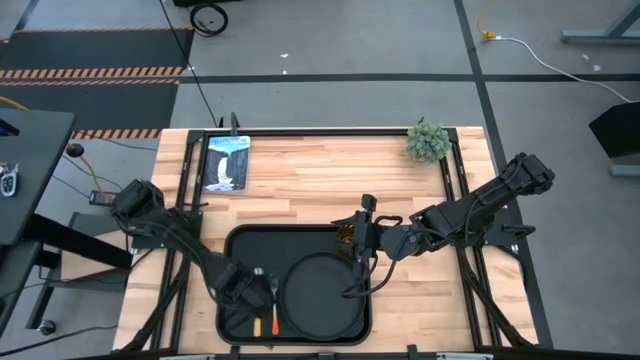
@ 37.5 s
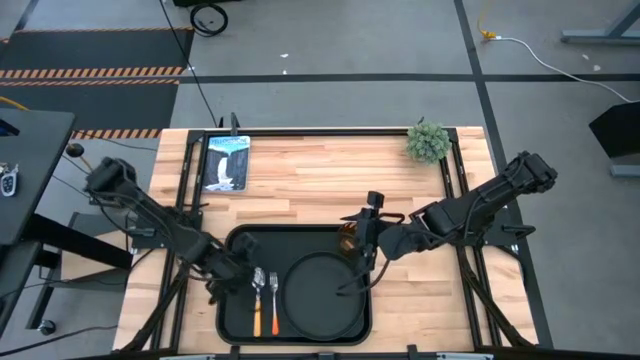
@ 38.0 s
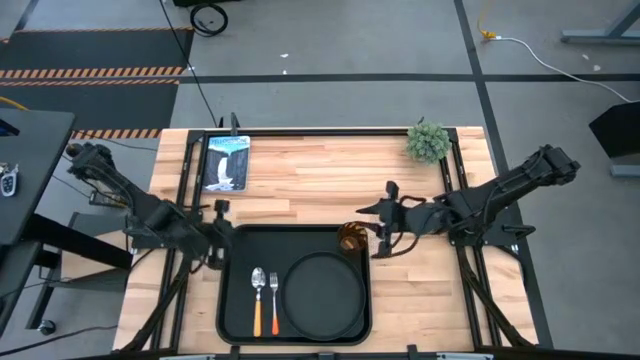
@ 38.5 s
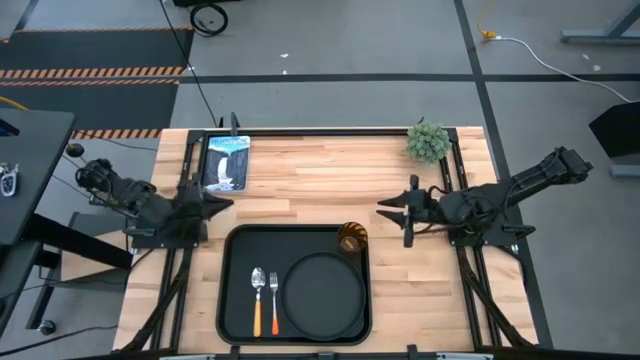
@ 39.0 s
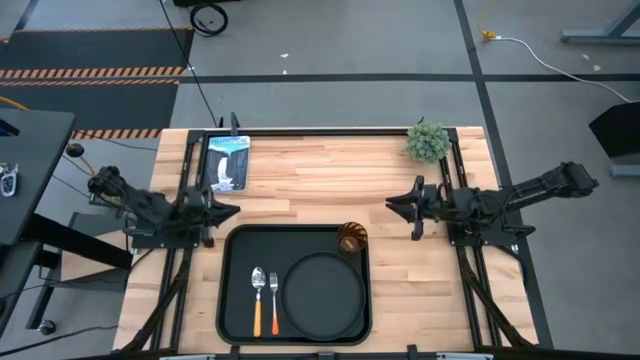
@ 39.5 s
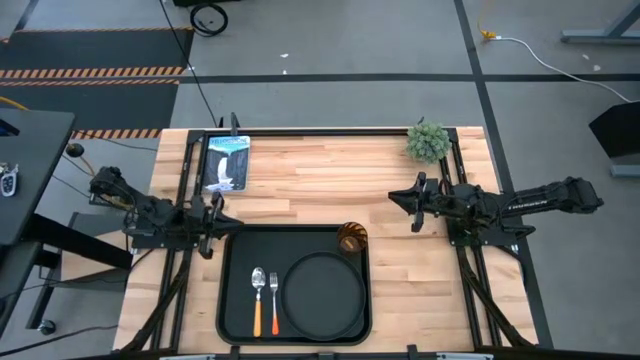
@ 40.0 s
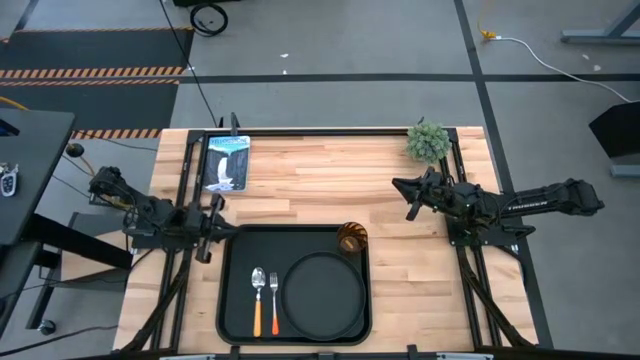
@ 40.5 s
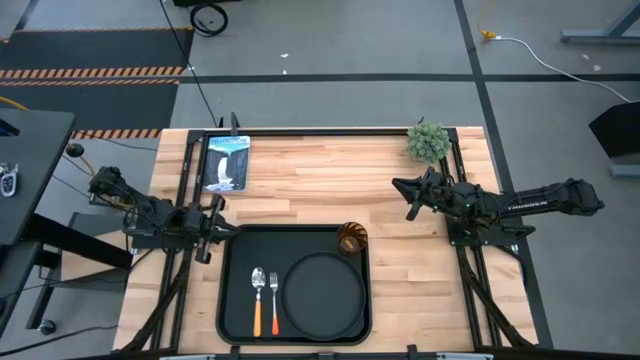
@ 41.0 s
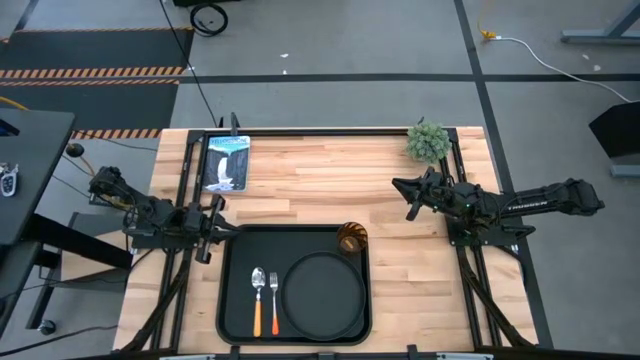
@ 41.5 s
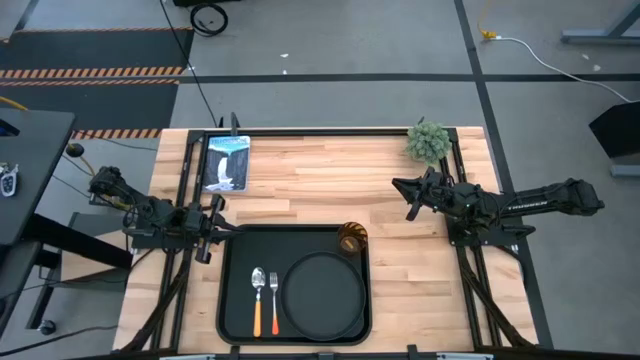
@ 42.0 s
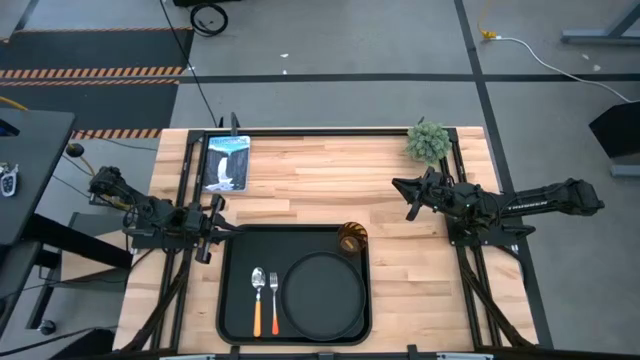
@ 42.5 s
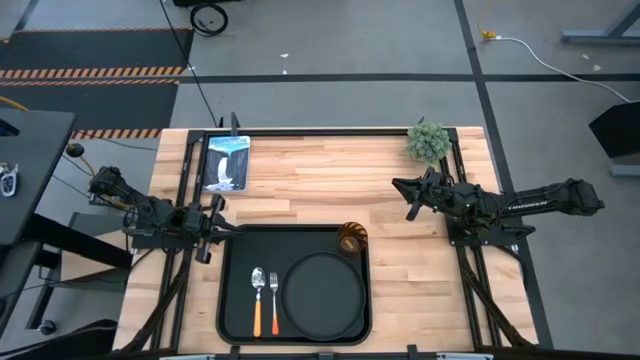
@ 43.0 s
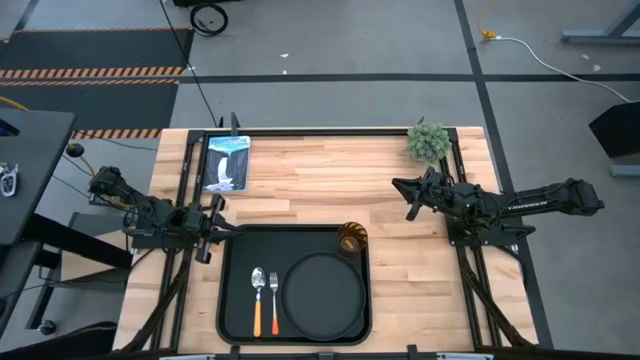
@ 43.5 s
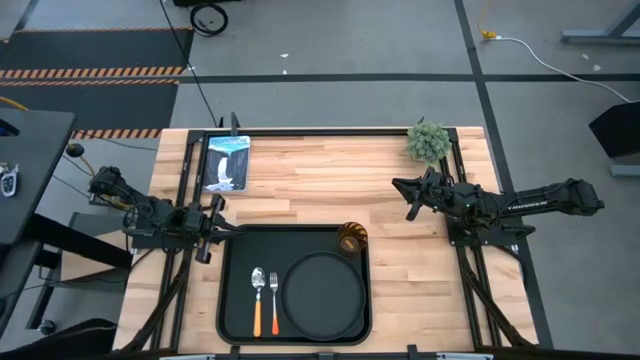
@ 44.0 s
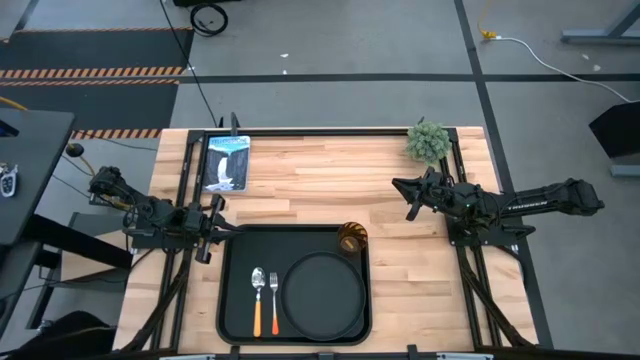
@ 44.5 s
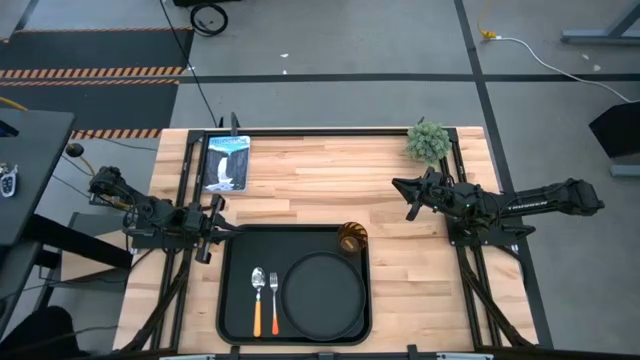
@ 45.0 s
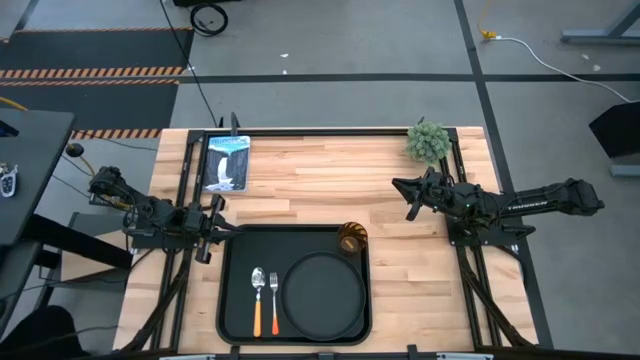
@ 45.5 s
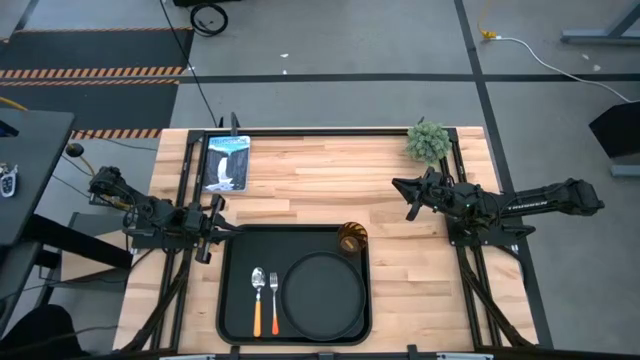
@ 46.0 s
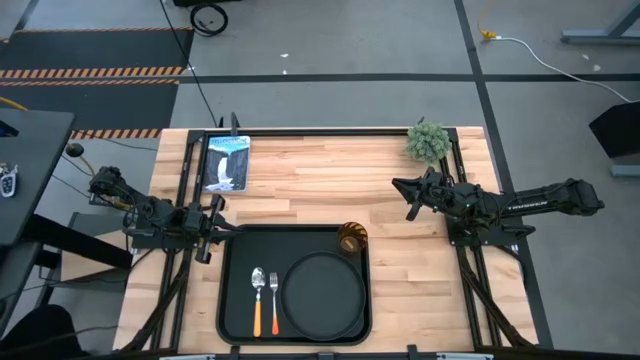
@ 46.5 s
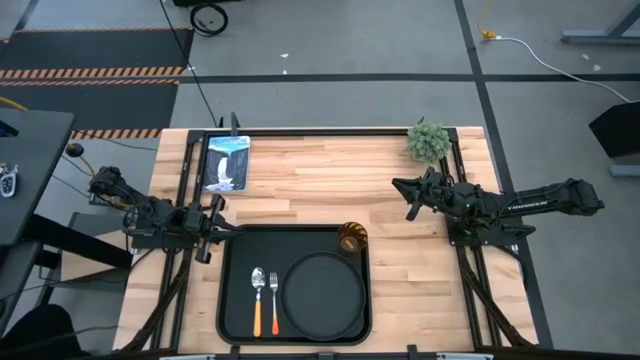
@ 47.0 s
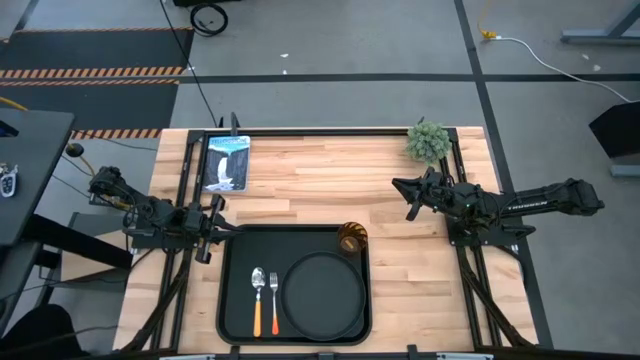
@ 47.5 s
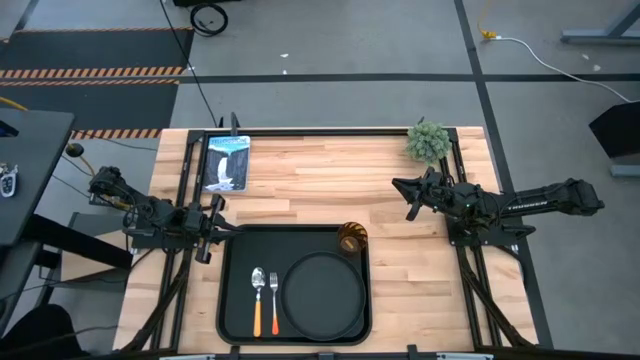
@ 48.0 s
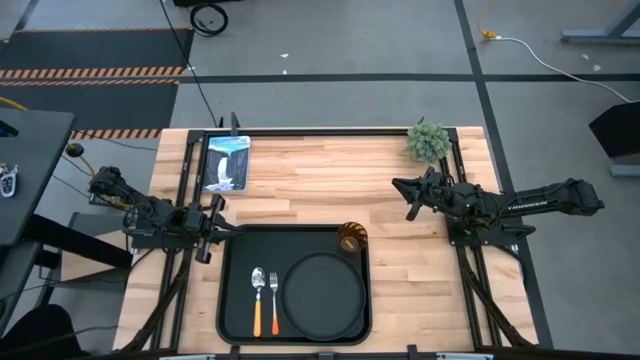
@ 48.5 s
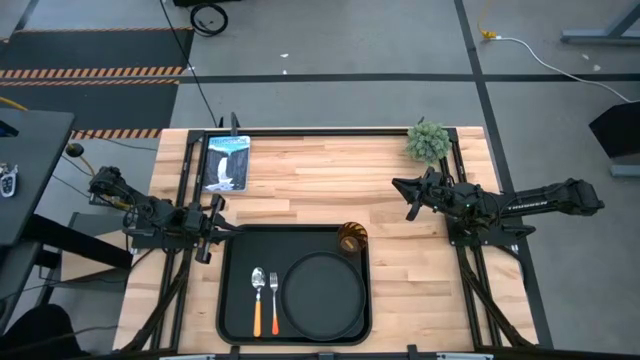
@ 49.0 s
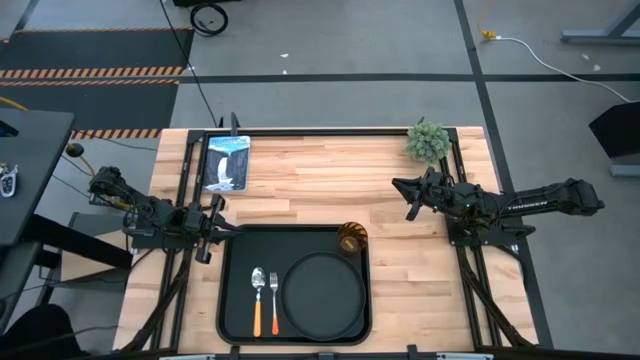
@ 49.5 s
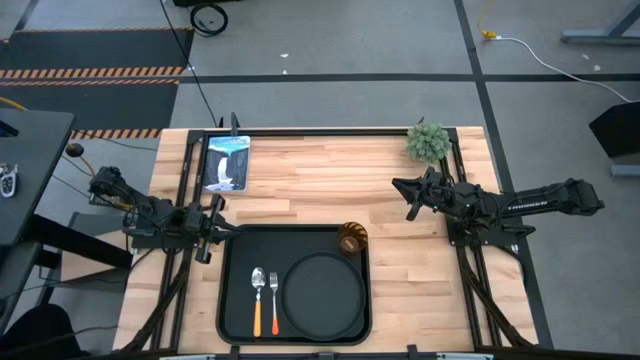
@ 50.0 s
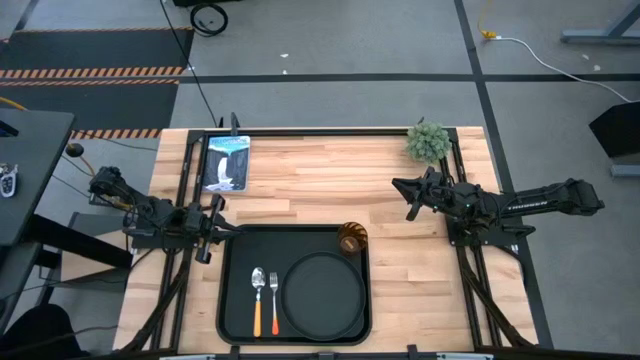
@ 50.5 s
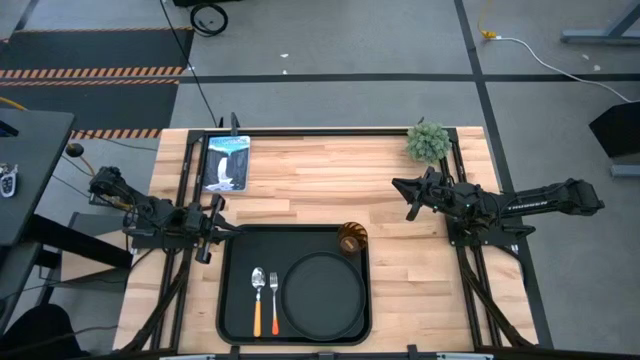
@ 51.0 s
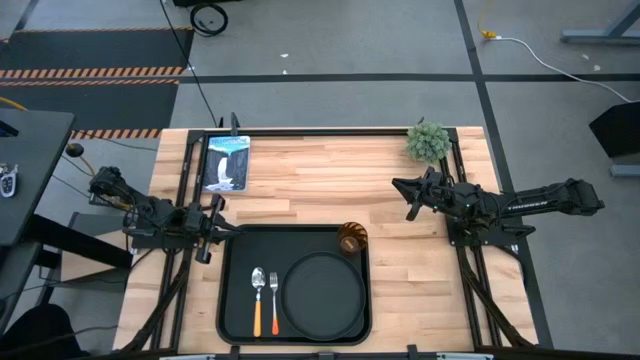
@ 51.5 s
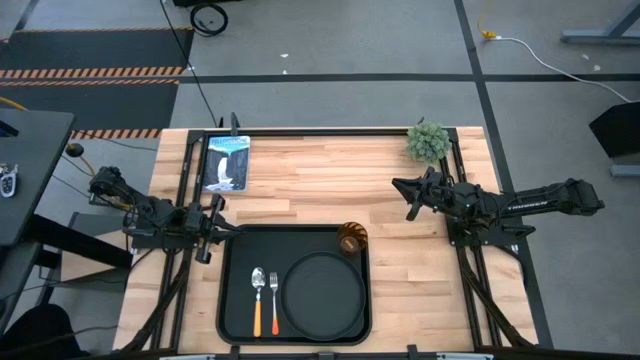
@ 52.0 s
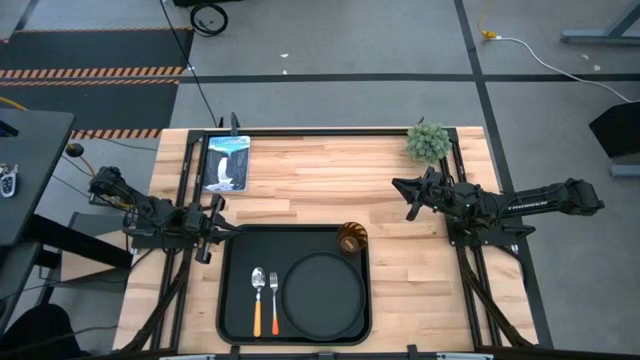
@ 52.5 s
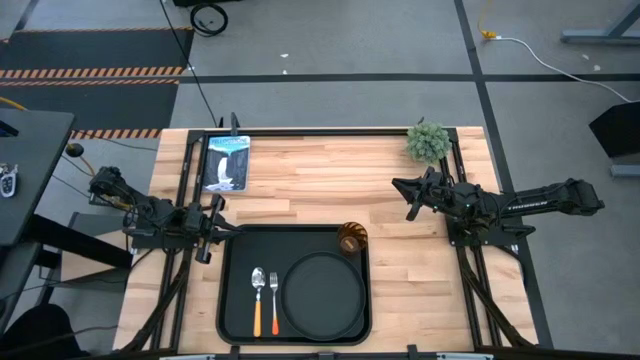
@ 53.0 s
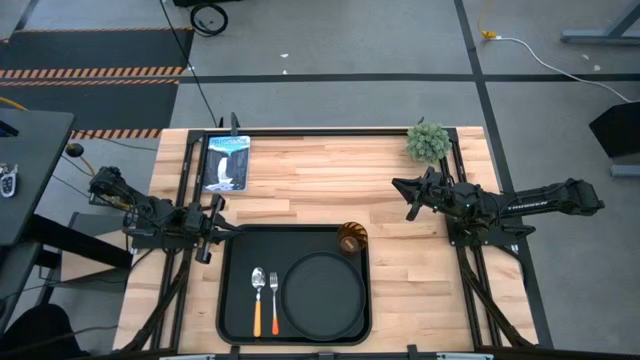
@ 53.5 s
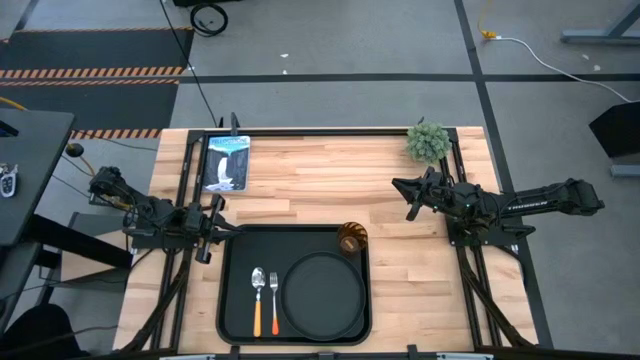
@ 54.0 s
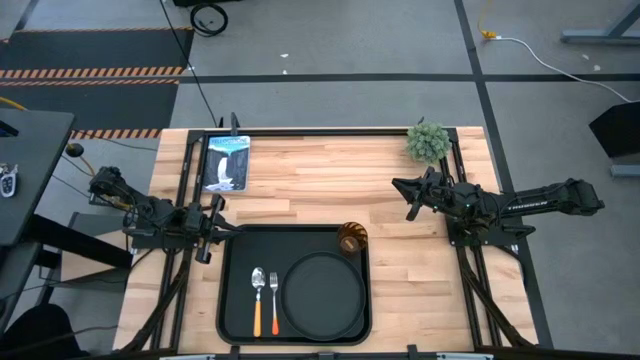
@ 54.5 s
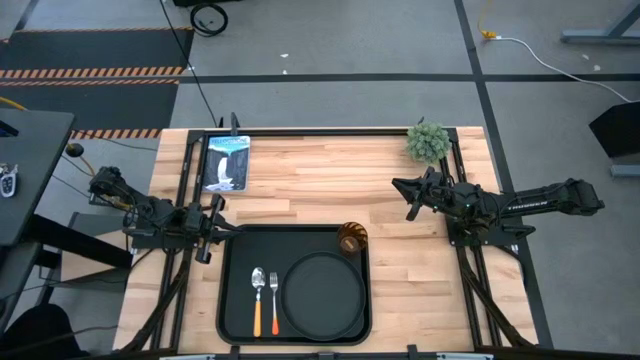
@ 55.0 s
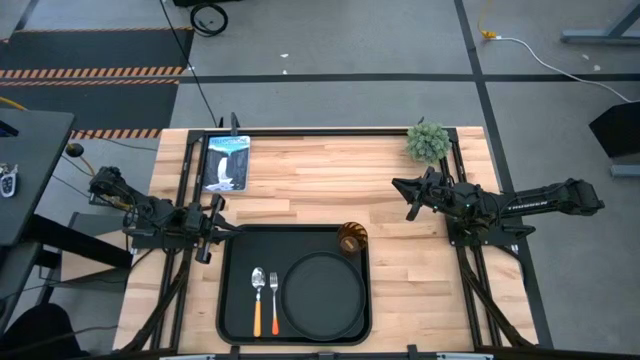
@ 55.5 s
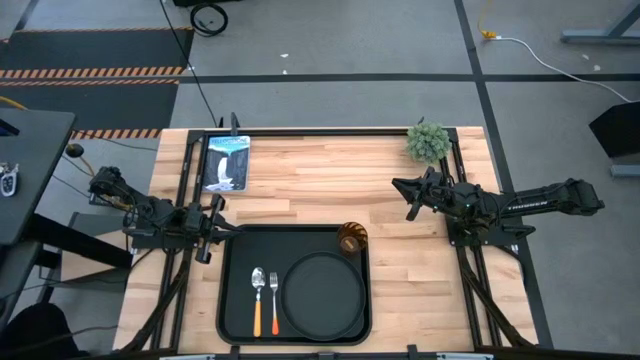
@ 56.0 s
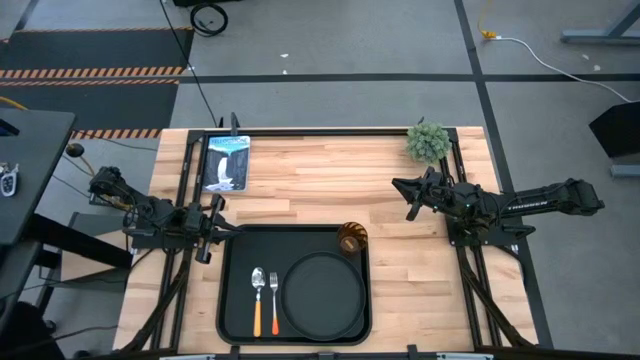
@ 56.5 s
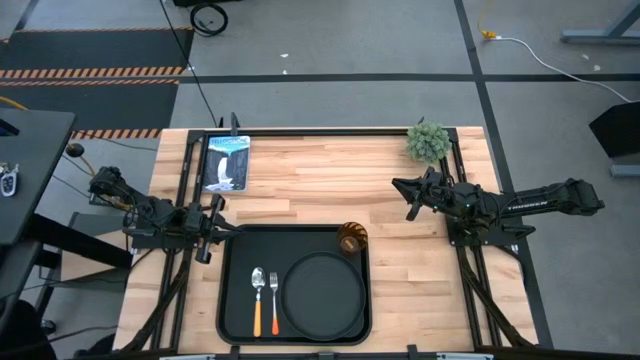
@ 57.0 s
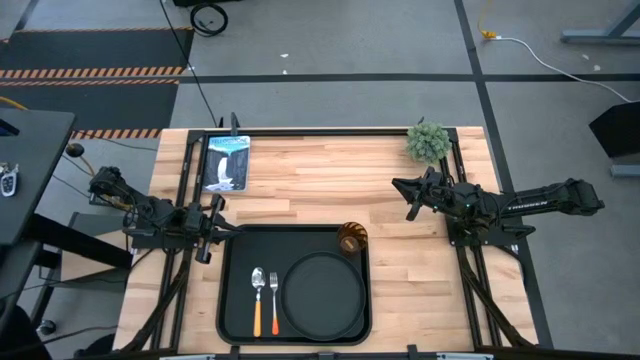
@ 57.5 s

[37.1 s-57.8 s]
Task: Pick and place plate/cup/fork/spoon on tray
Return to Home Position
